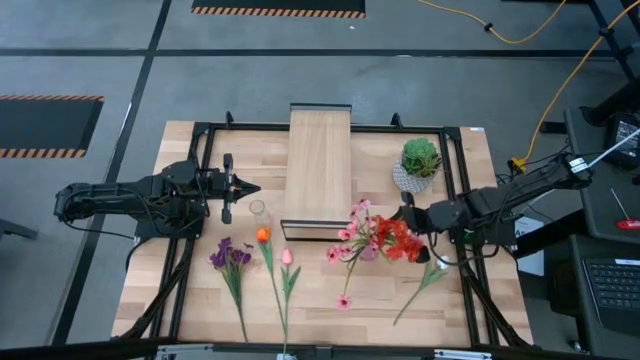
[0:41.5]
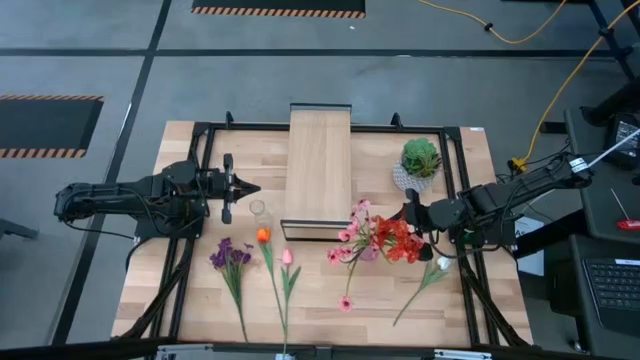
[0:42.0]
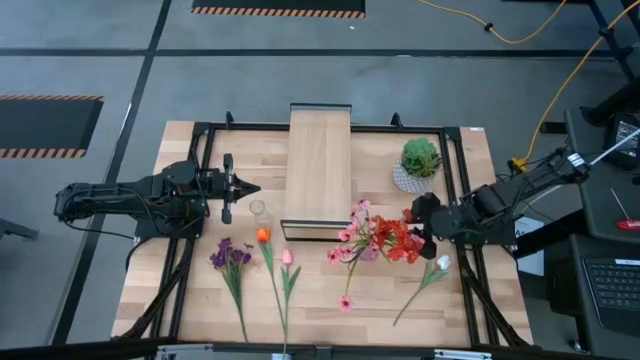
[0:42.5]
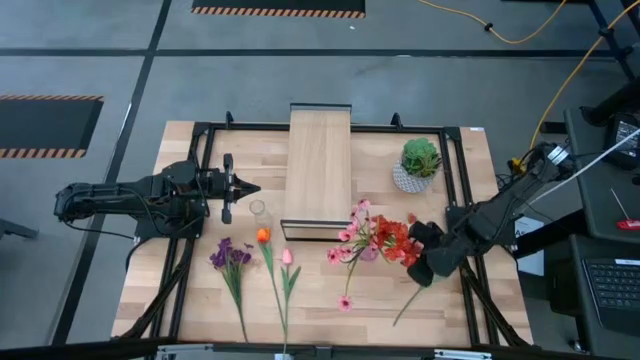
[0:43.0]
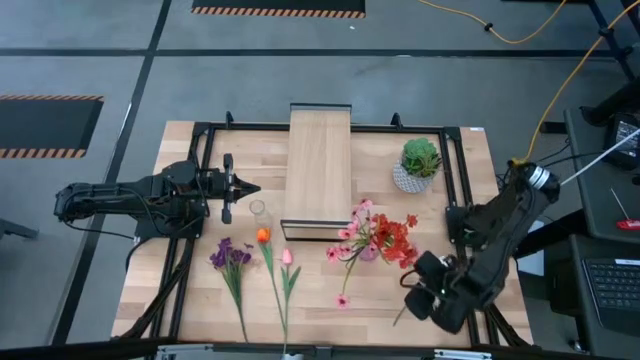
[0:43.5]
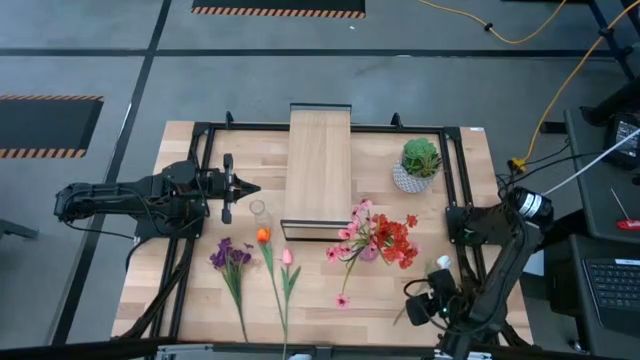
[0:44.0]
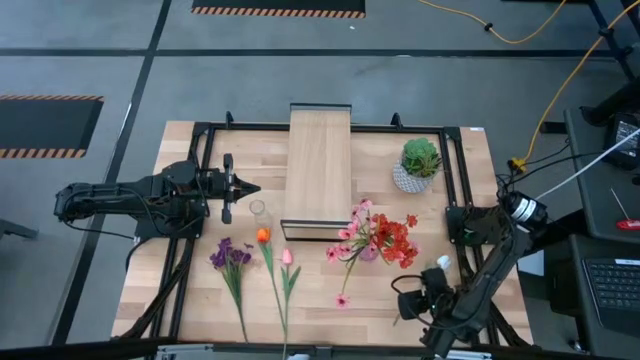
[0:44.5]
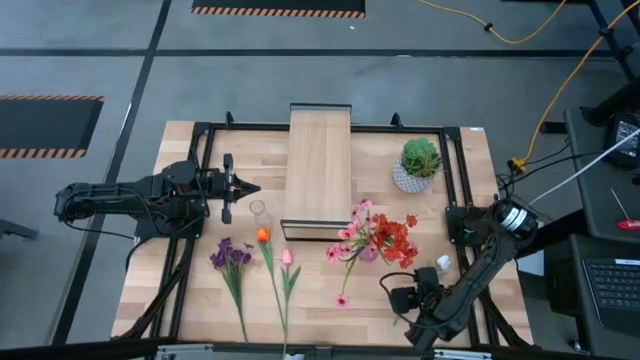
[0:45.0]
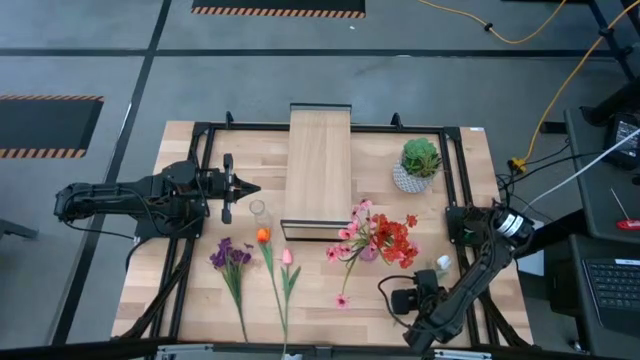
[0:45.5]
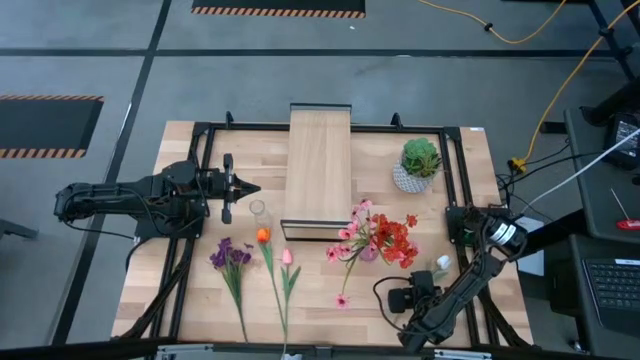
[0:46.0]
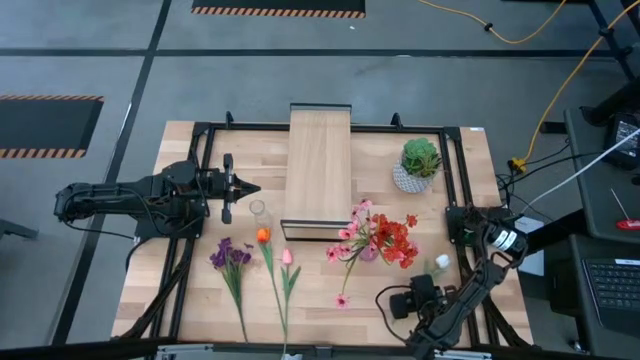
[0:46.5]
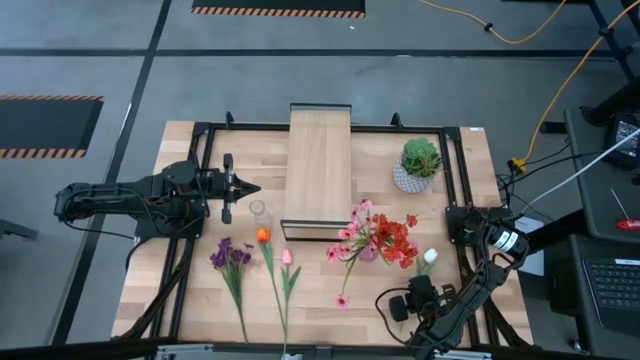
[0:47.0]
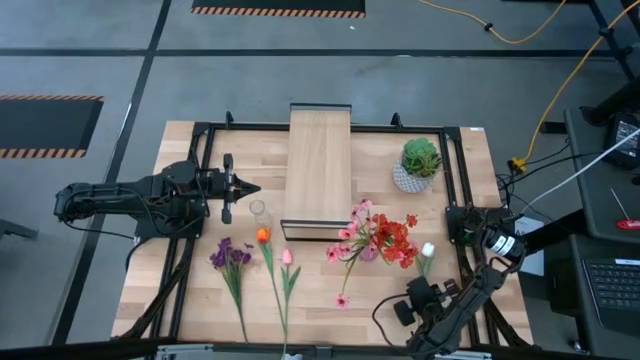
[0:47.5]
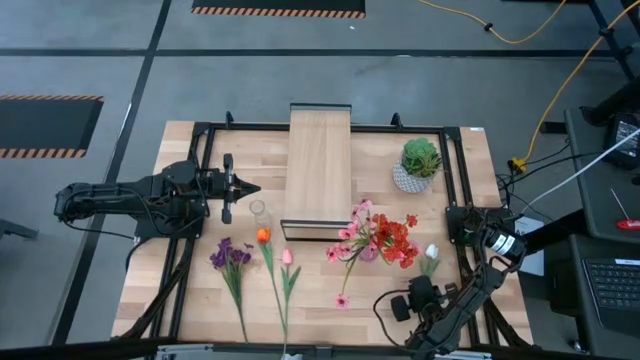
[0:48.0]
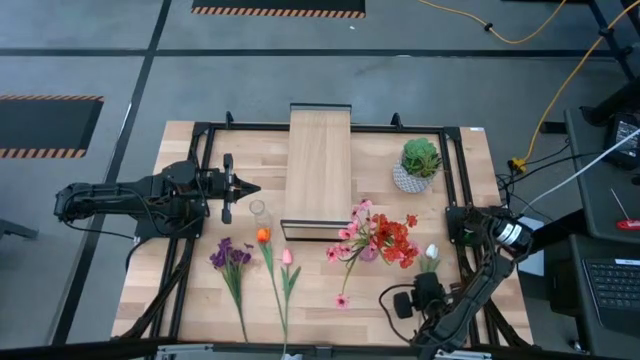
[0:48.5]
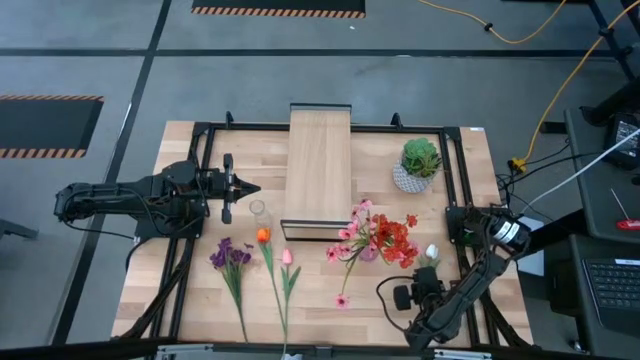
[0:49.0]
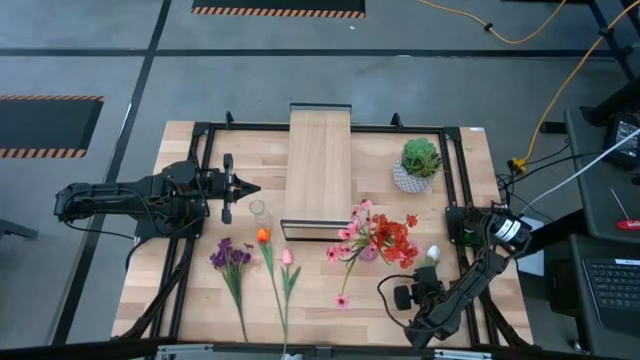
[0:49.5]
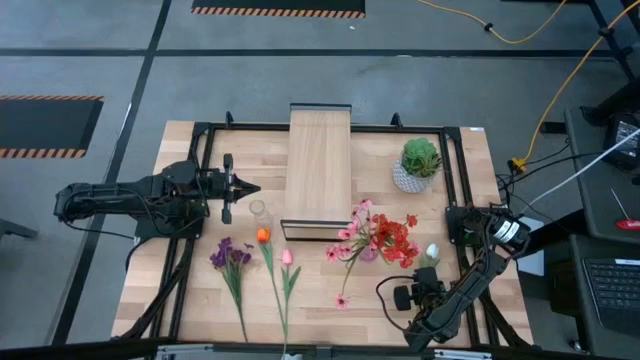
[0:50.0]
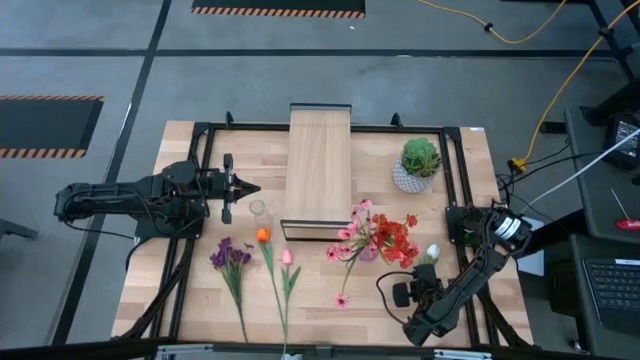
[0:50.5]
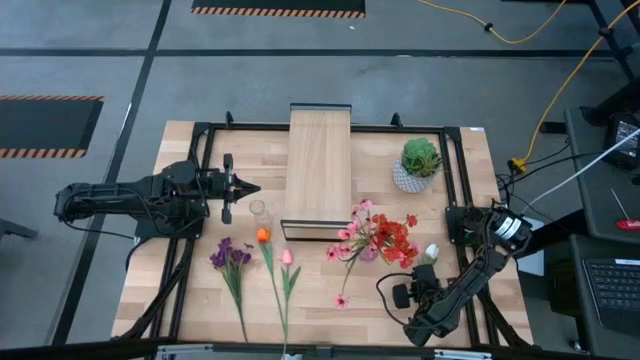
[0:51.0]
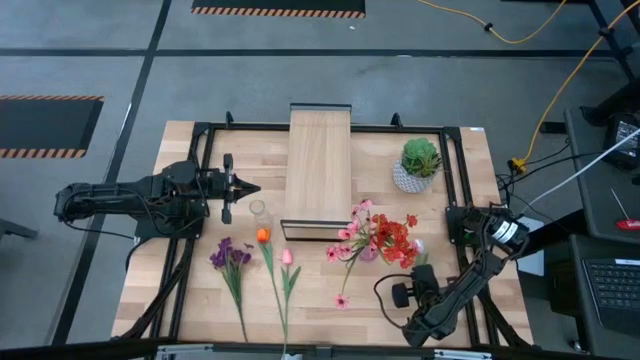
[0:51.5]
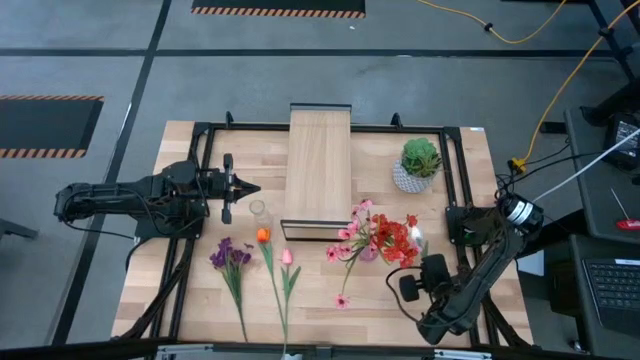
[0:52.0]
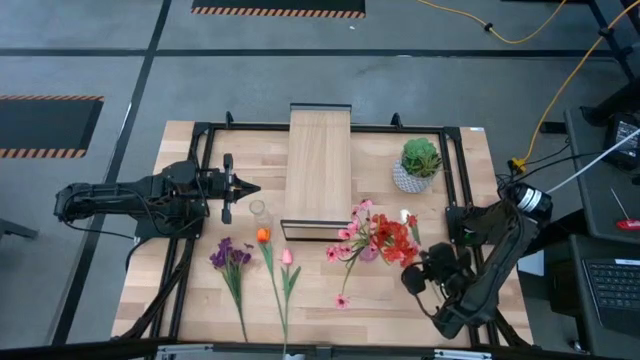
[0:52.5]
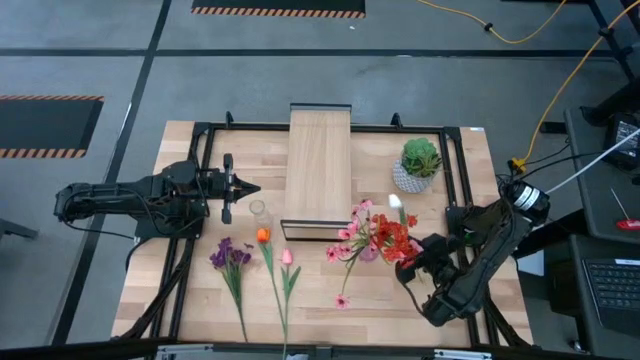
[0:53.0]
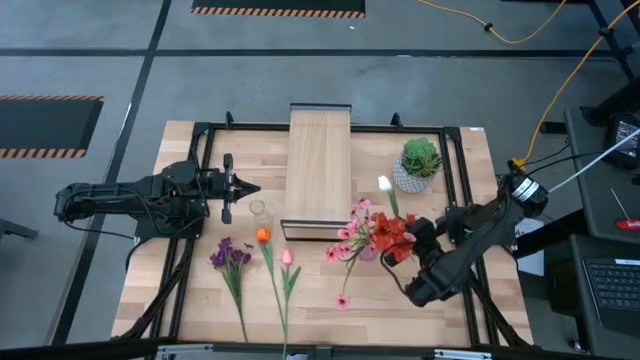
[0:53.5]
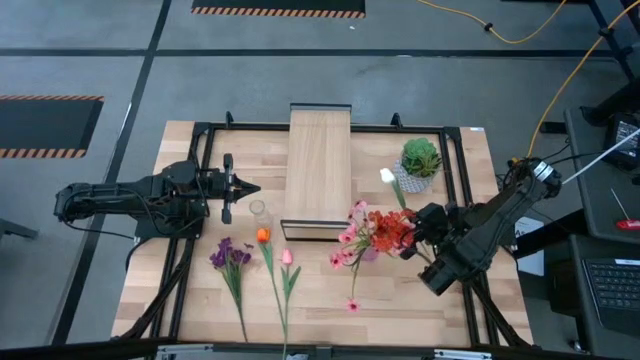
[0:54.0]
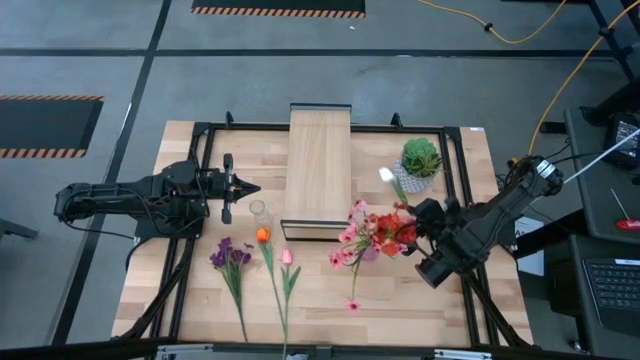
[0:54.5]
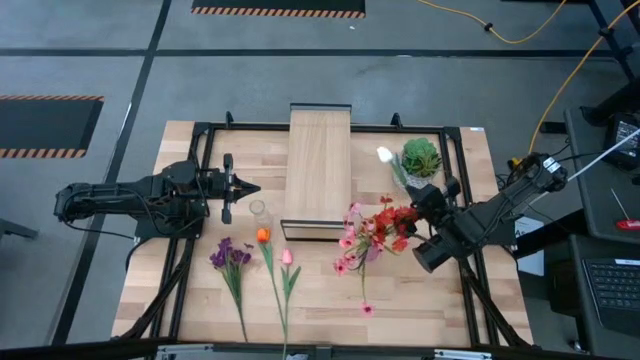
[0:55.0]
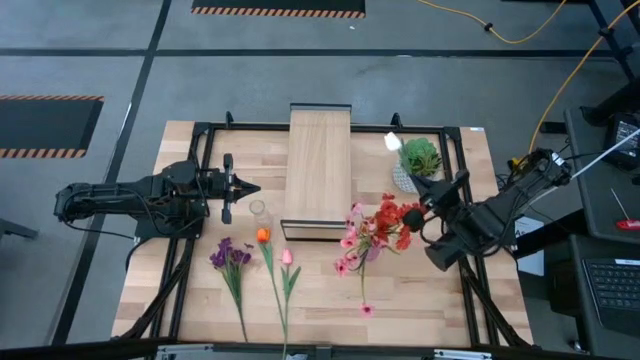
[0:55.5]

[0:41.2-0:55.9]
Task: Pick and place flowers into a vace then onto a shelf
Put the white tulip into the purple vase

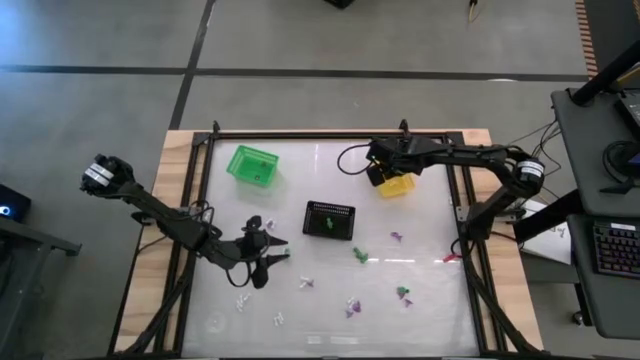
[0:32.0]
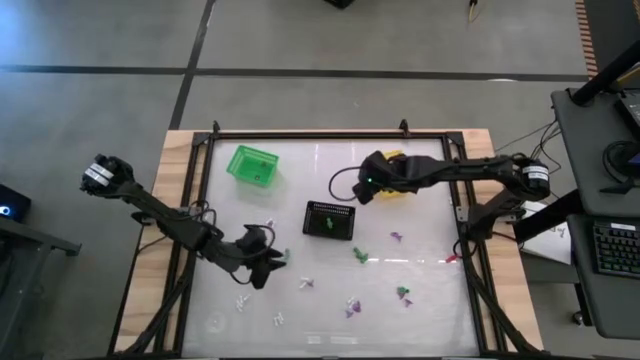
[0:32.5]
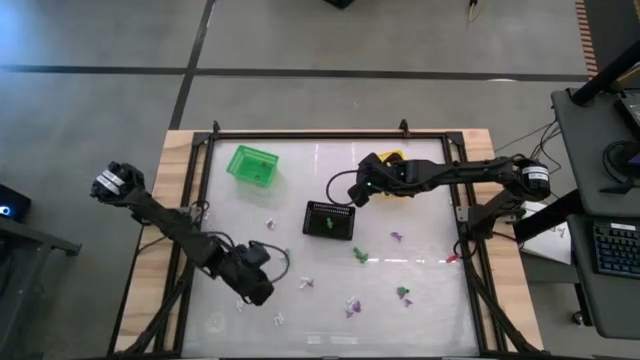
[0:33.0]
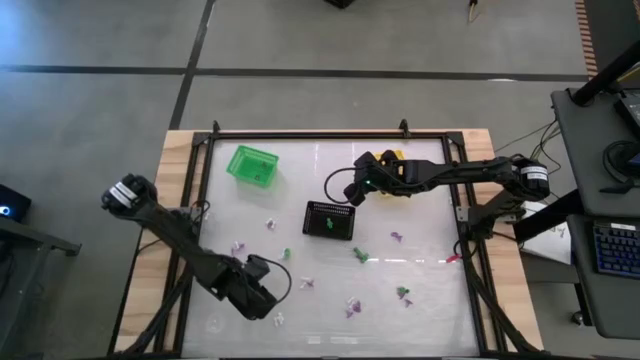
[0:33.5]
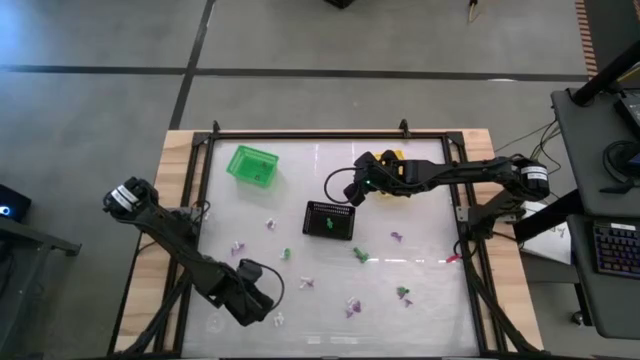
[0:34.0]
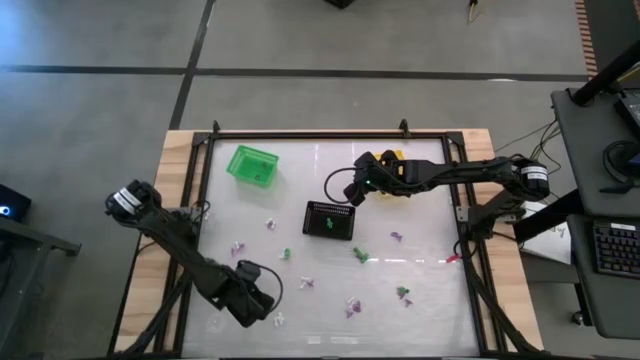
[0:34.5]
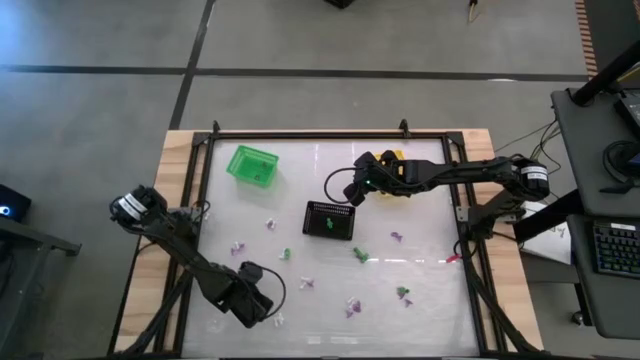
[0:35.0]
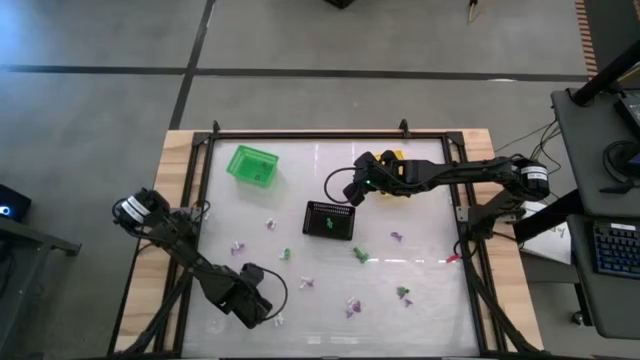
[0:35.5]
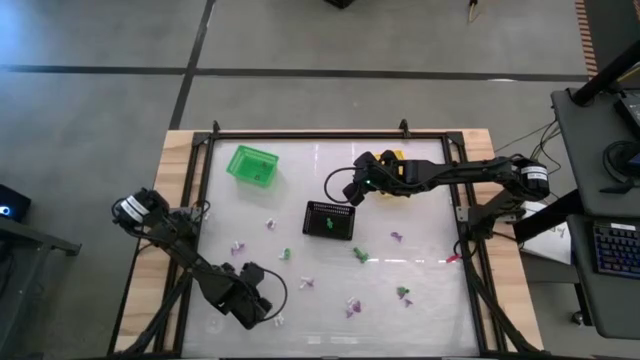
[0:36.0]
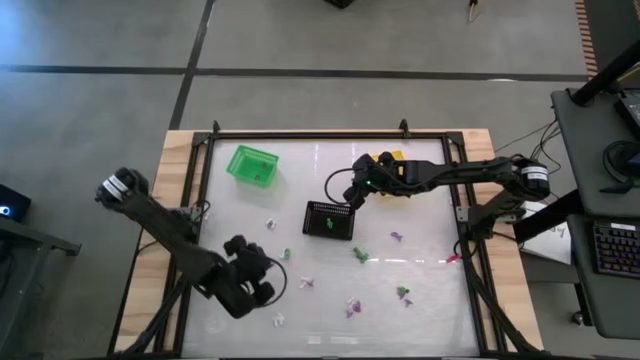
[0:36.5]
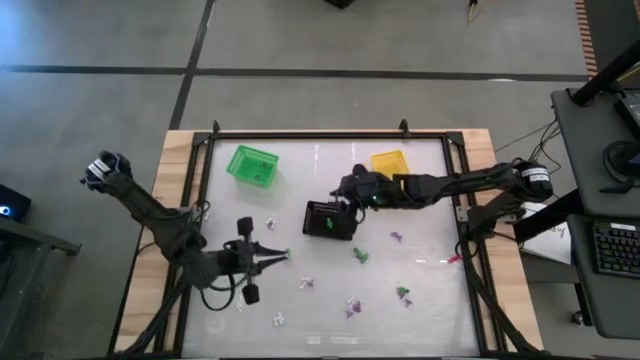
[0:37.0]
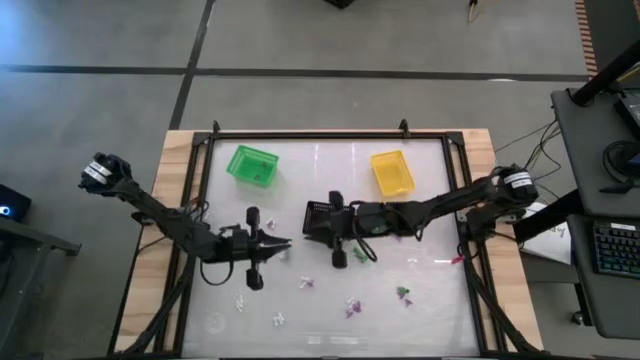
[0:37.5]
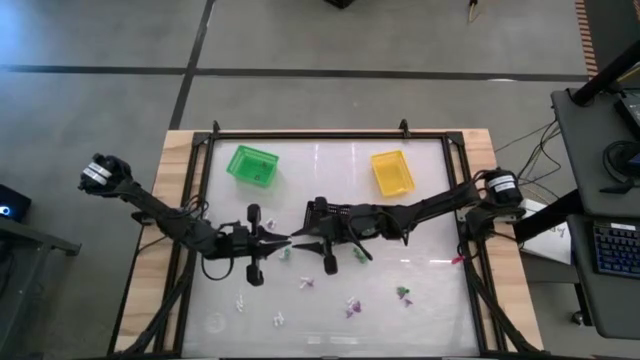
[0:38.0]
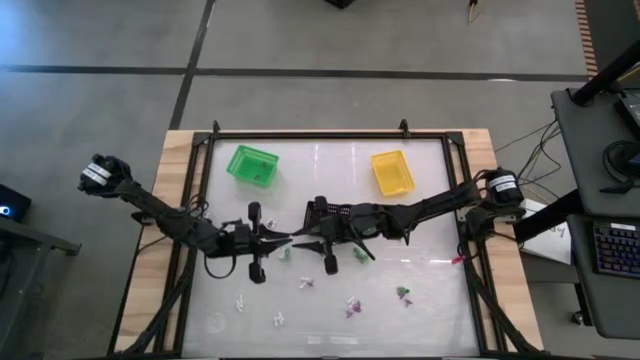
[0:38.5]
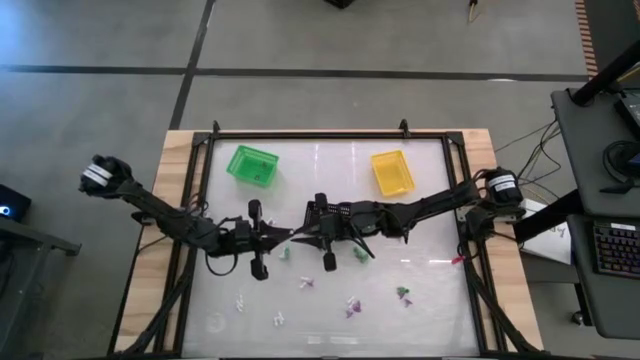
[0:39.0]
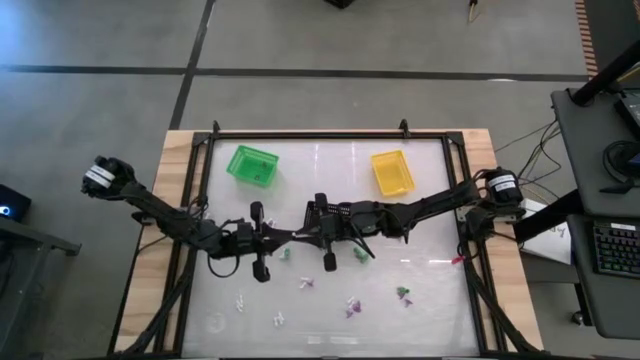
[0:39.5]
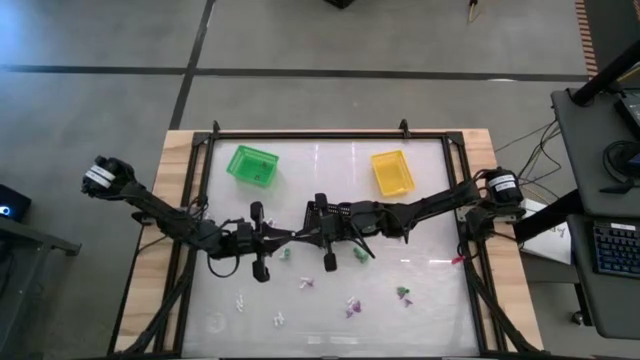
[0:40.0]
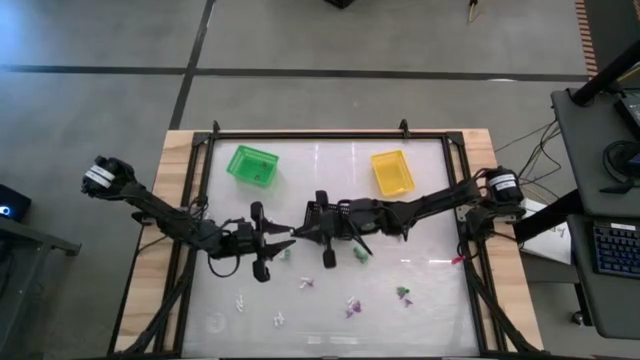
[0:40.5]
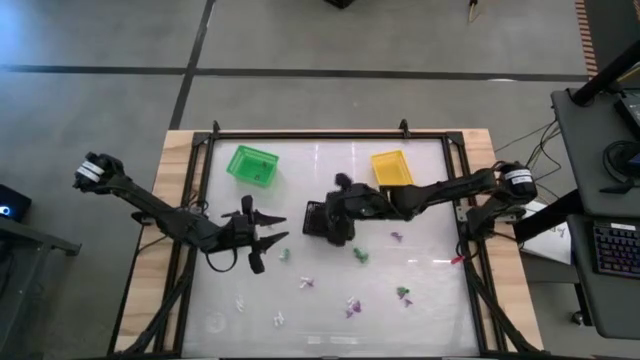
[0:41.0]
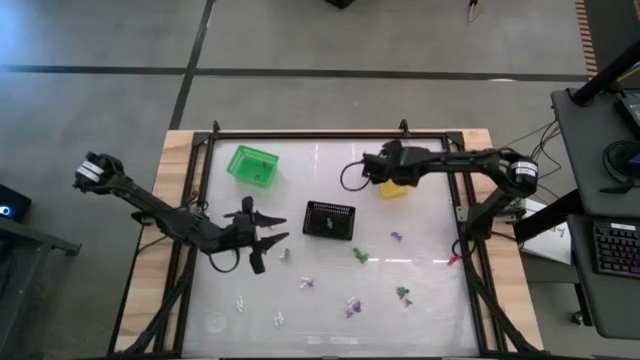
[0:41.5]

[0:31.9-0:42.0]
Task: Sort Halloween decoration
Put the white bone toy into the yellow bin
